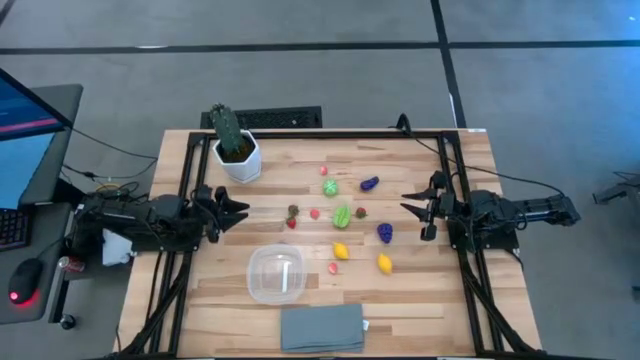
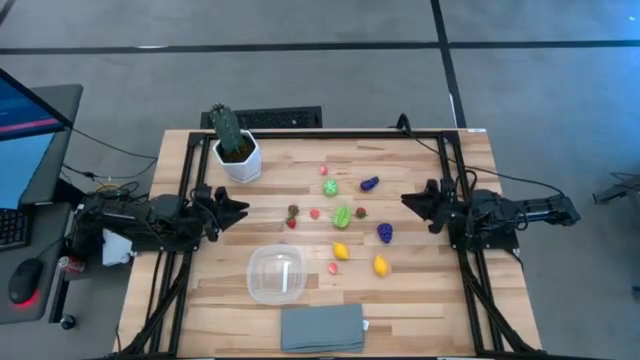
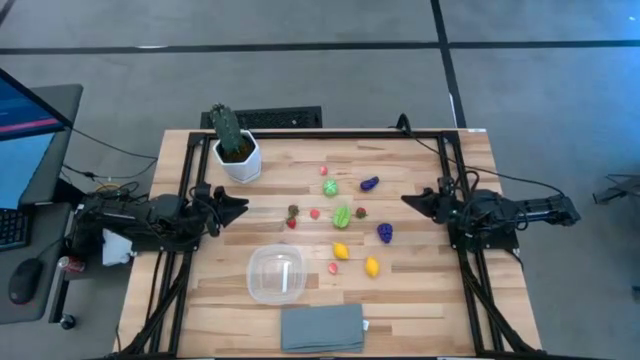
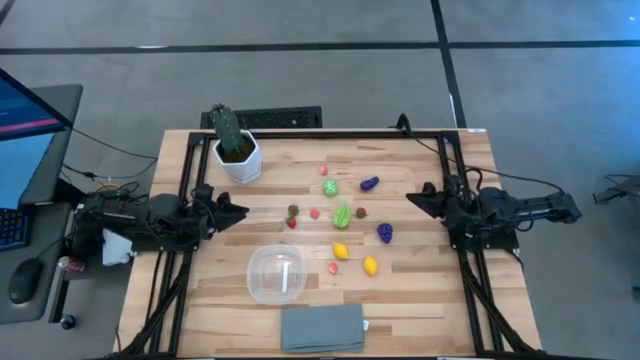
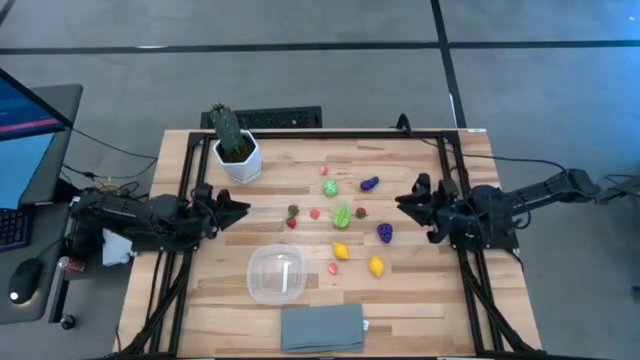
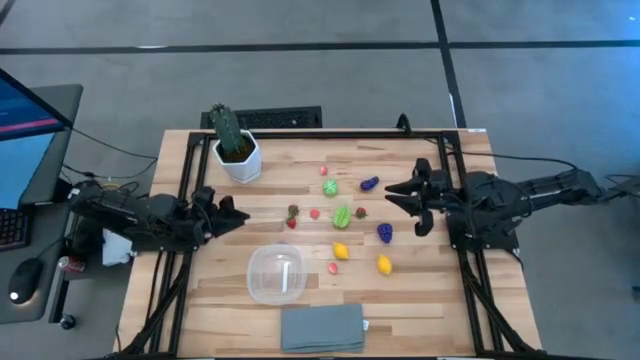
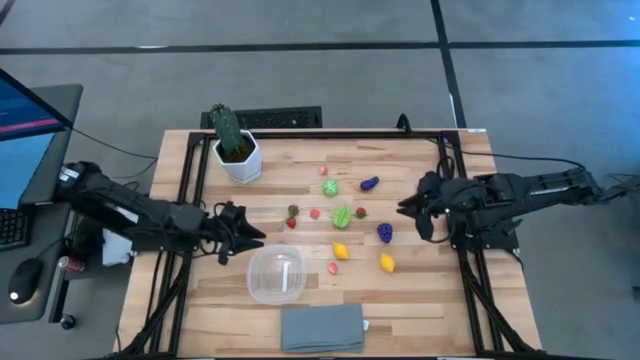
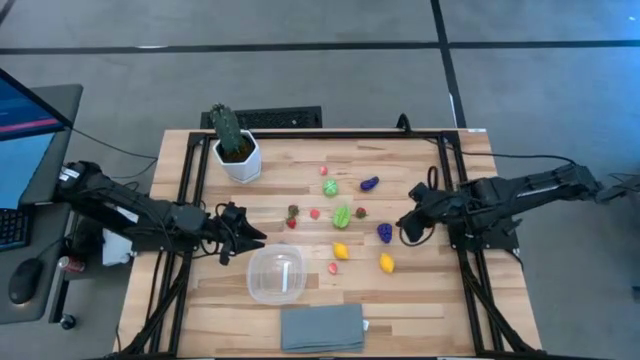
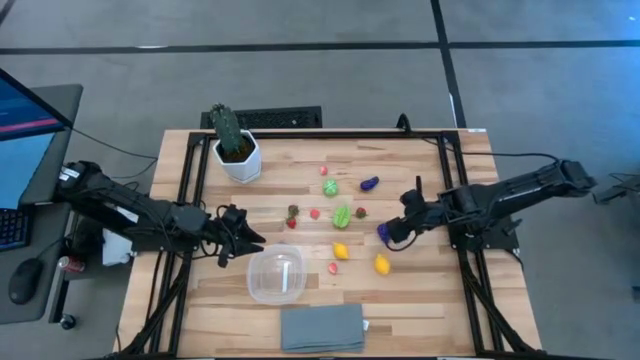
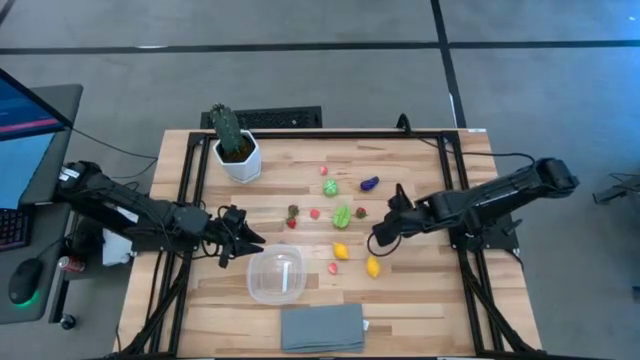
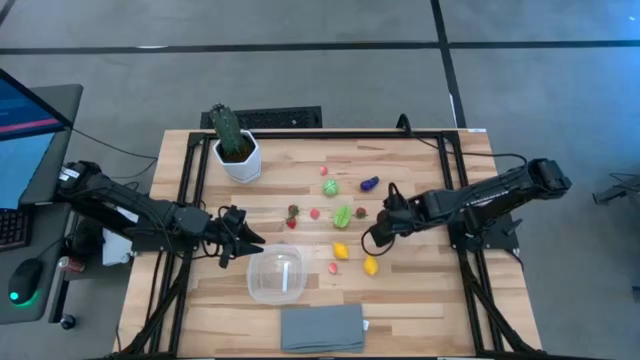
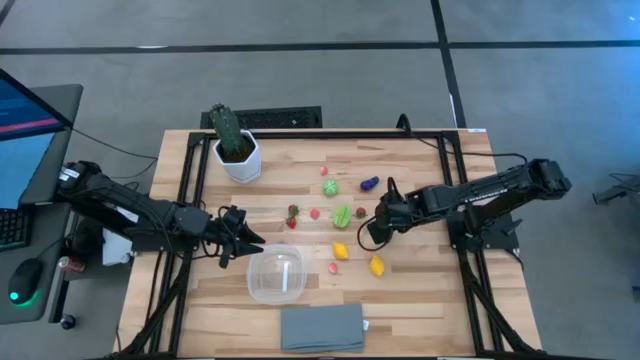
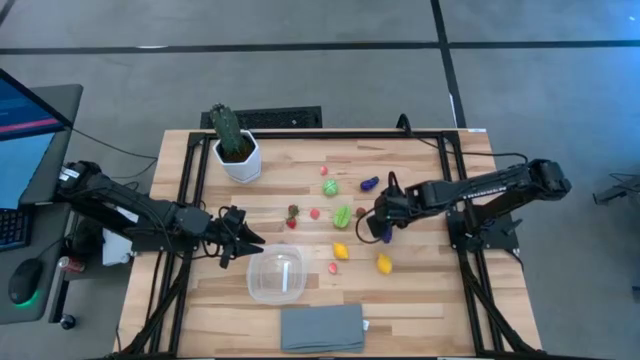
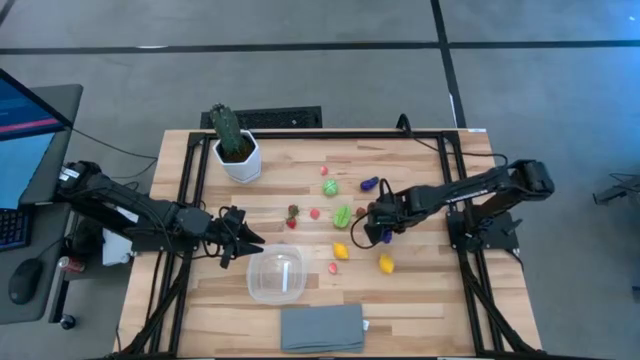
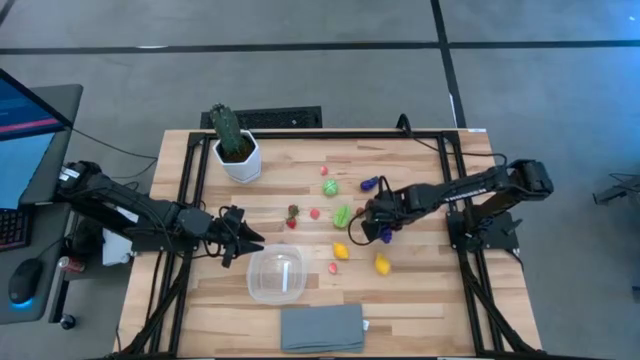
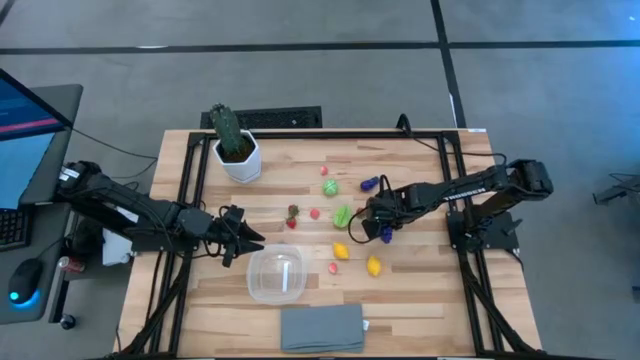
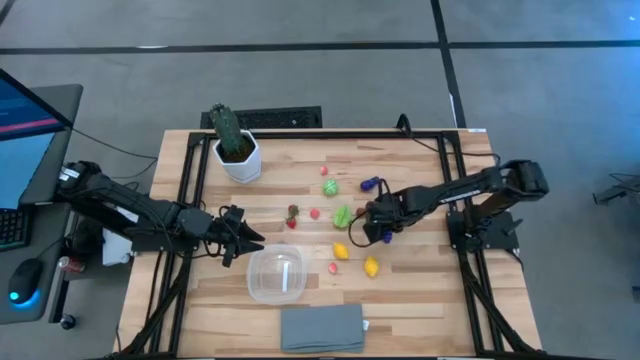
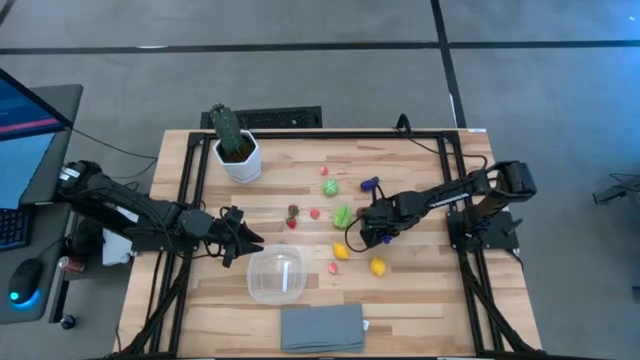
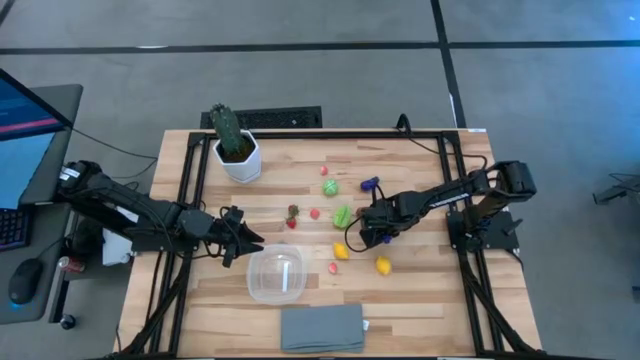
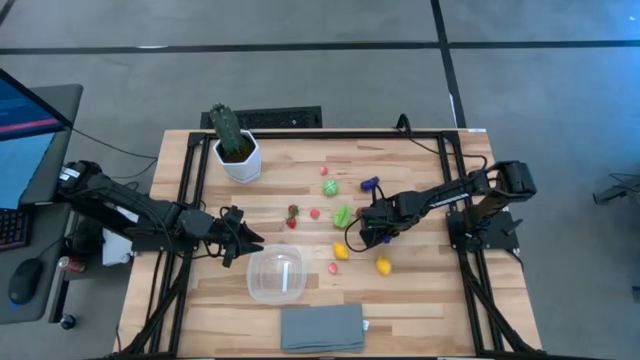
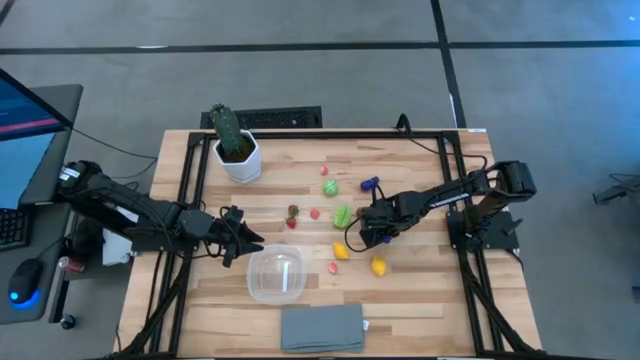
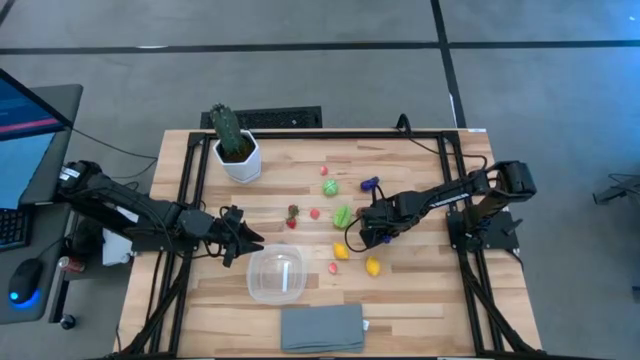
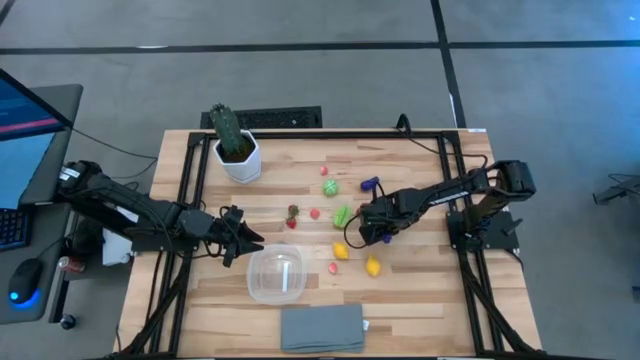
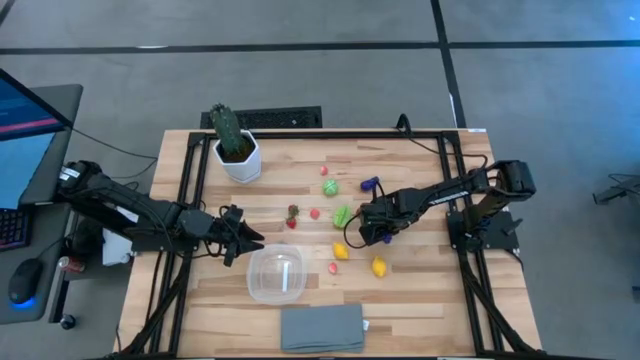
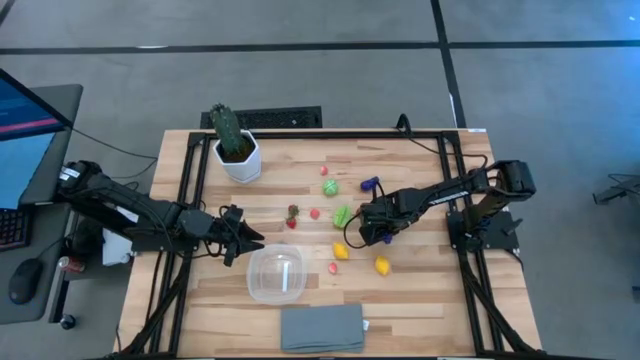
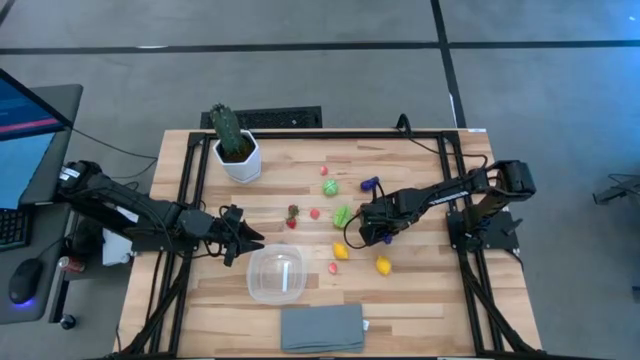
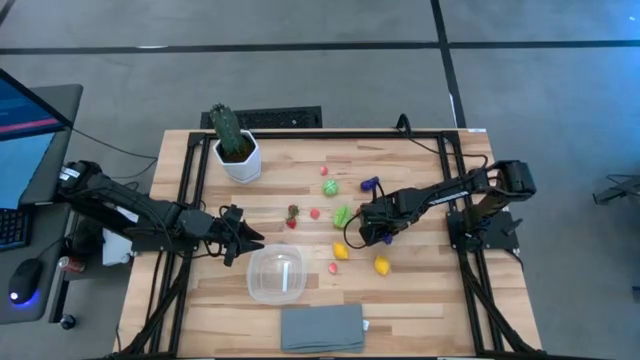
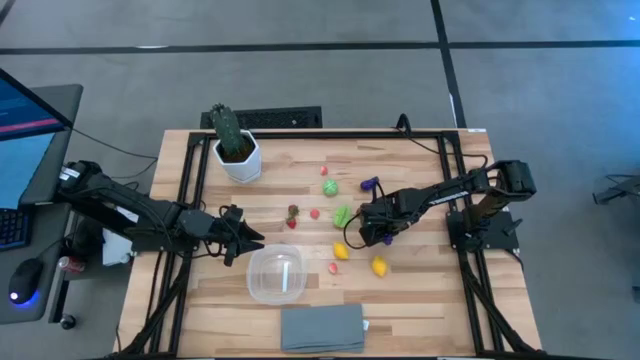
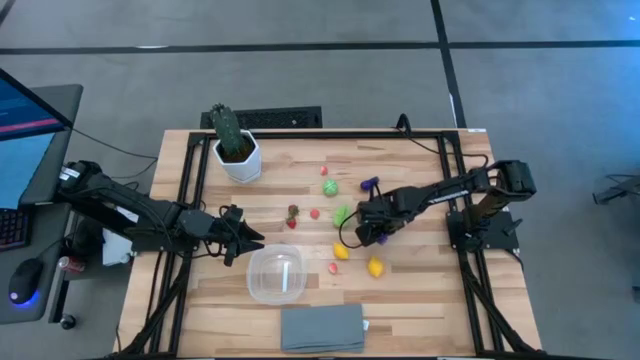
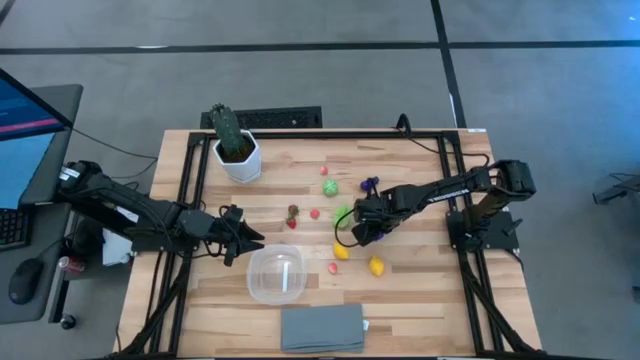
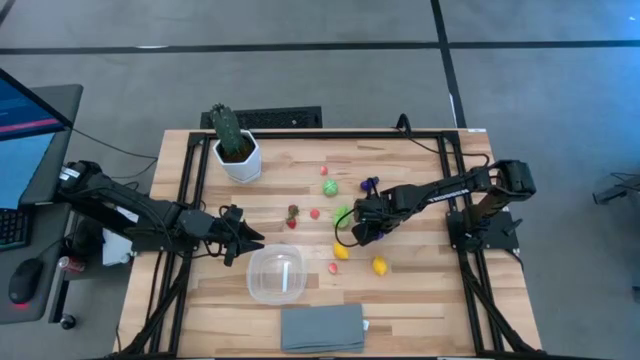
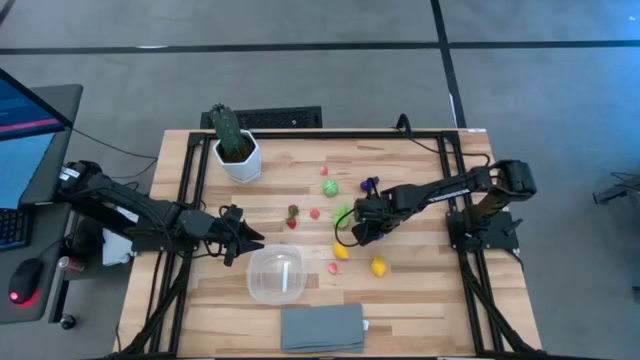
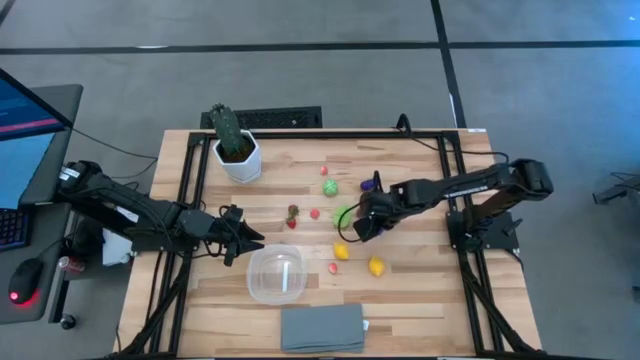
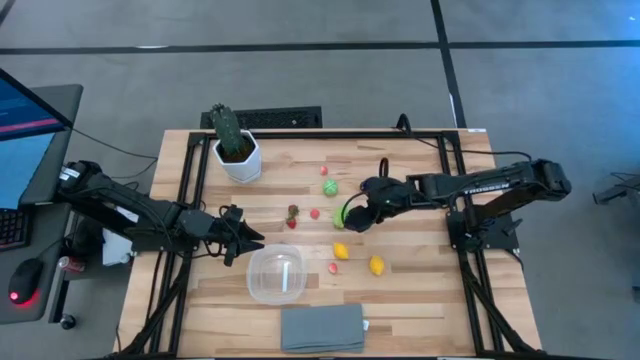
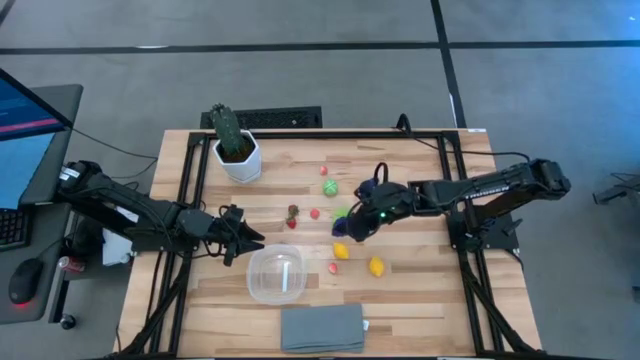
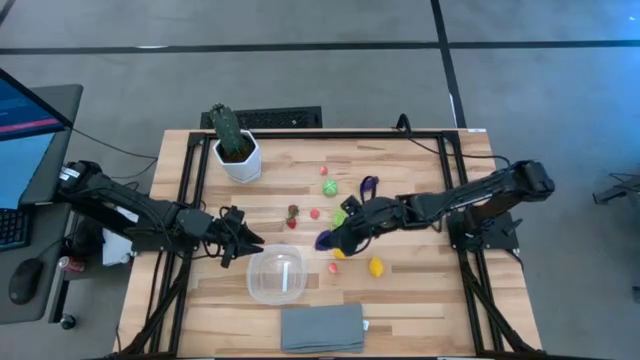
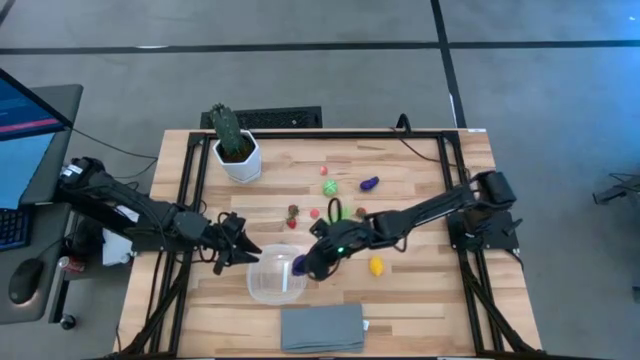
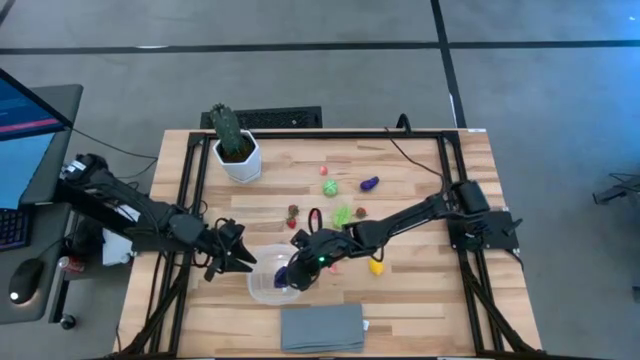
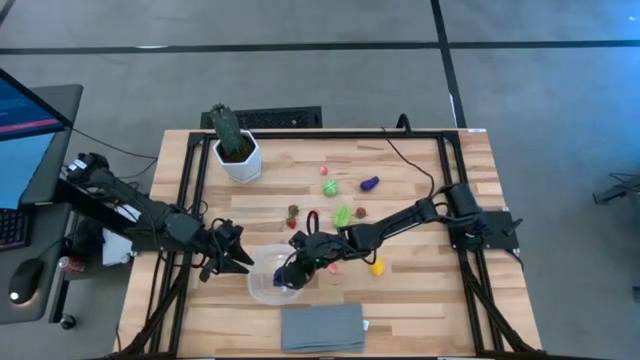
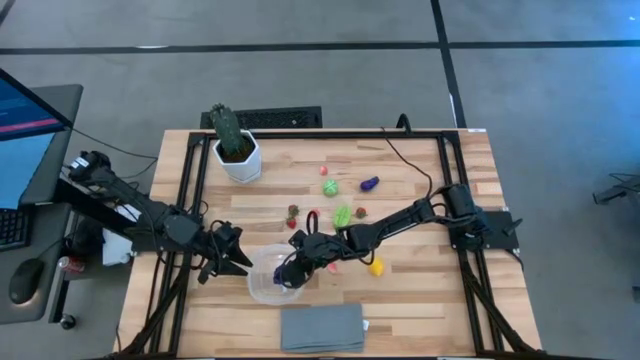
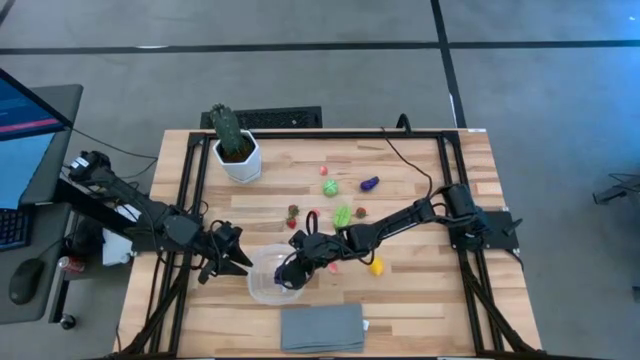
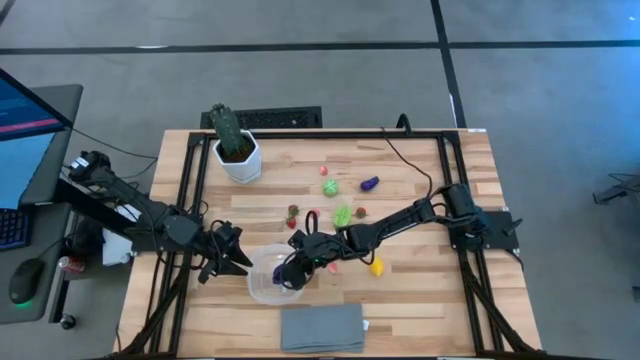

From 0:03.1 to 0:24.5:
Task: Pick and placing Produce into tupperware
Put the grapes into the transparent bin
